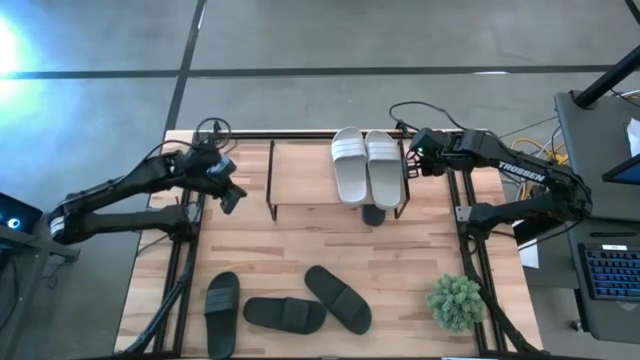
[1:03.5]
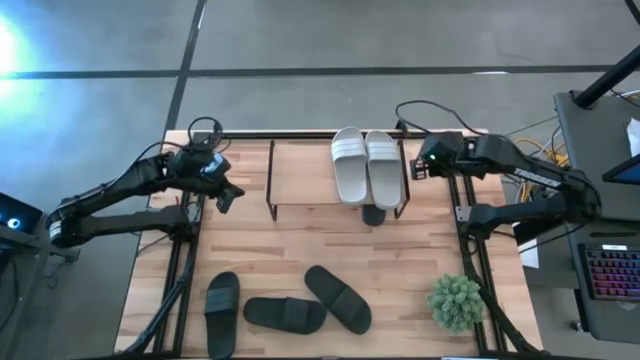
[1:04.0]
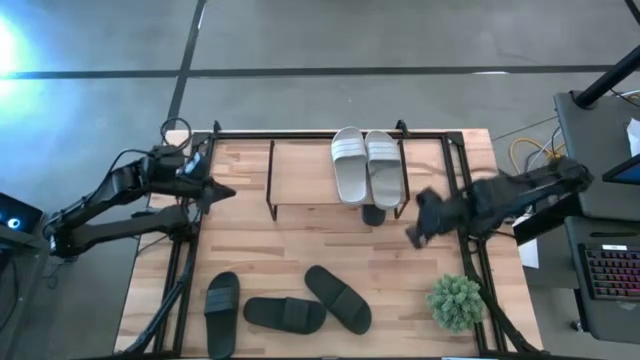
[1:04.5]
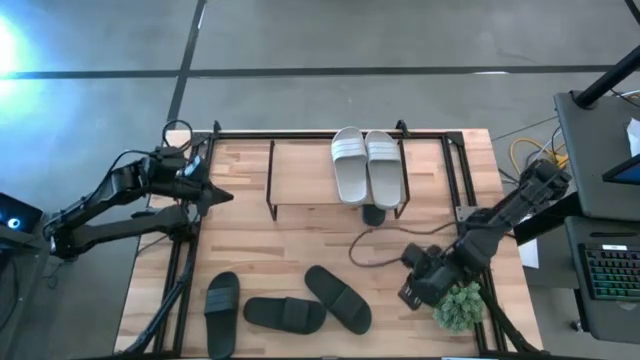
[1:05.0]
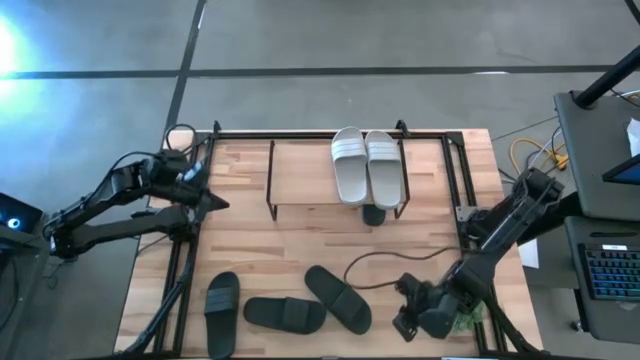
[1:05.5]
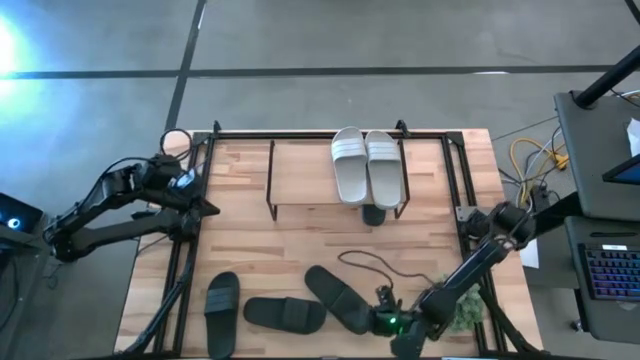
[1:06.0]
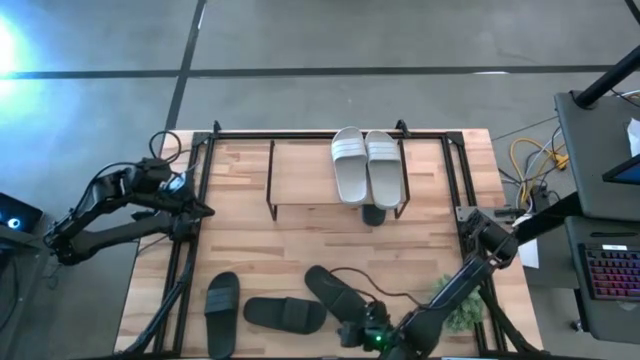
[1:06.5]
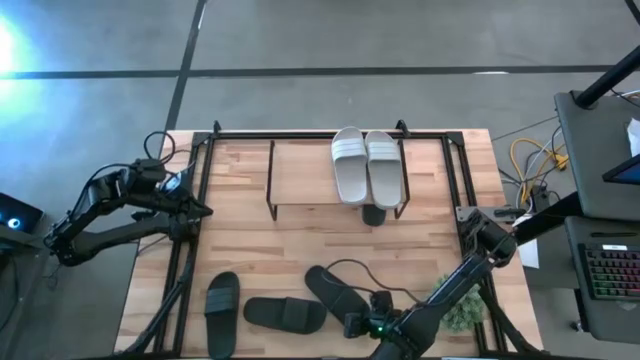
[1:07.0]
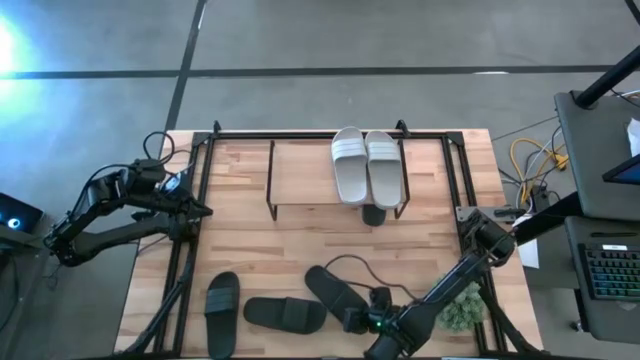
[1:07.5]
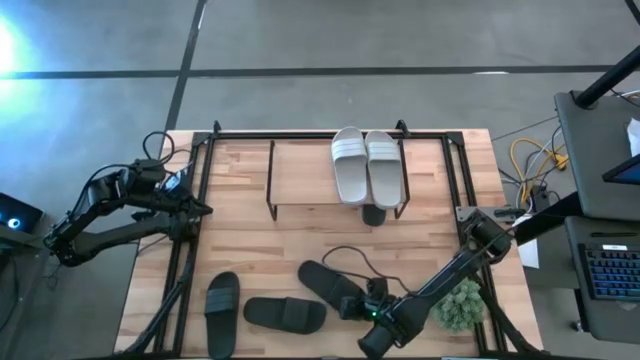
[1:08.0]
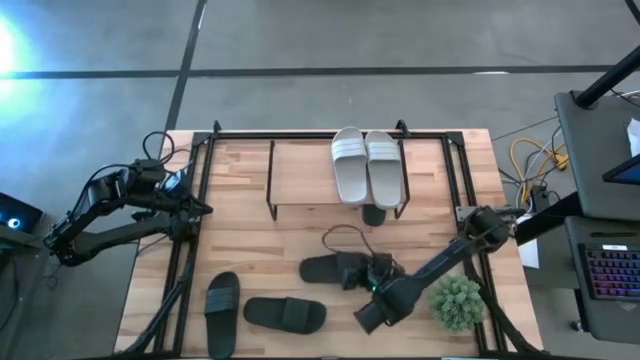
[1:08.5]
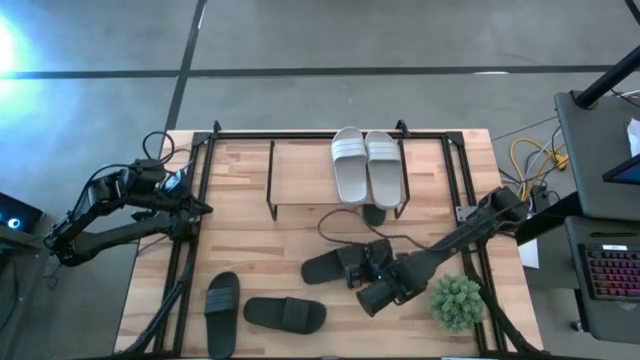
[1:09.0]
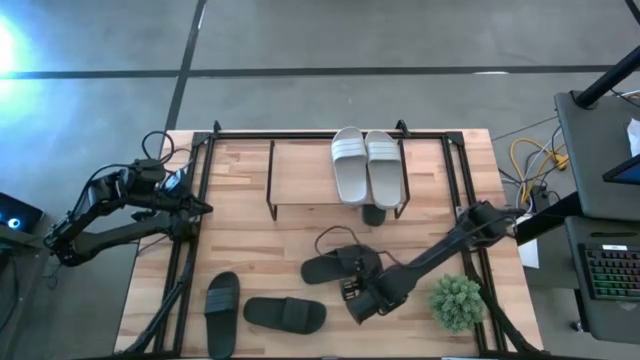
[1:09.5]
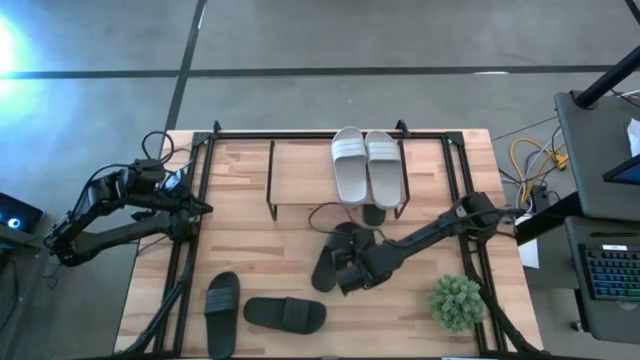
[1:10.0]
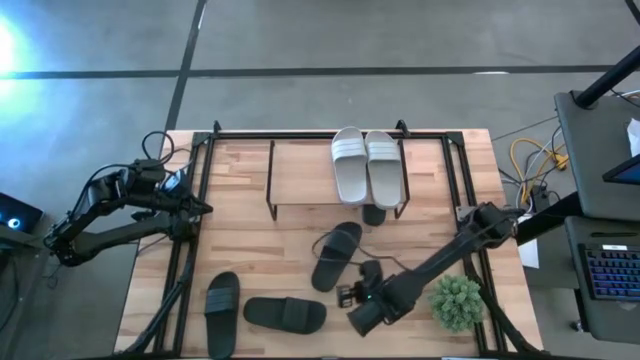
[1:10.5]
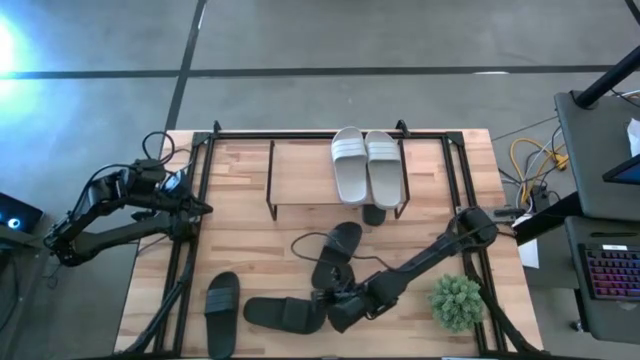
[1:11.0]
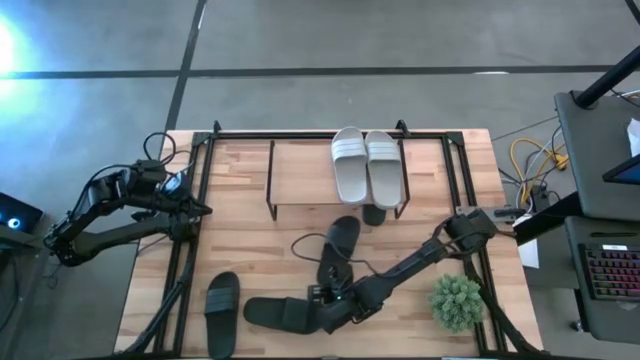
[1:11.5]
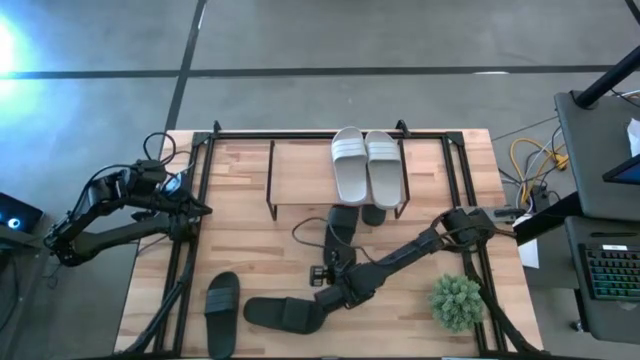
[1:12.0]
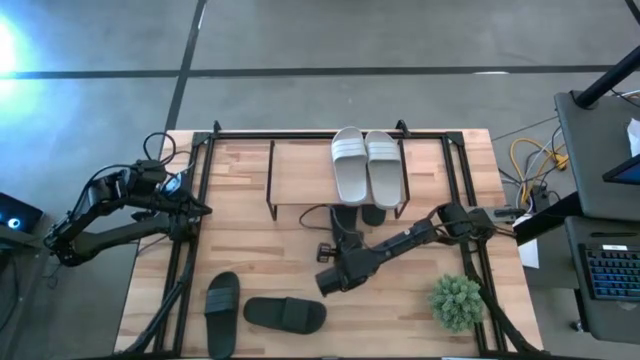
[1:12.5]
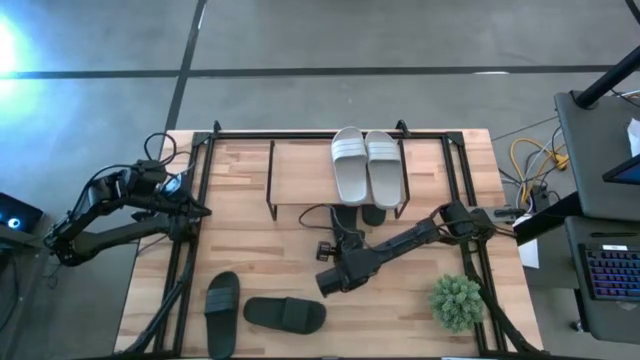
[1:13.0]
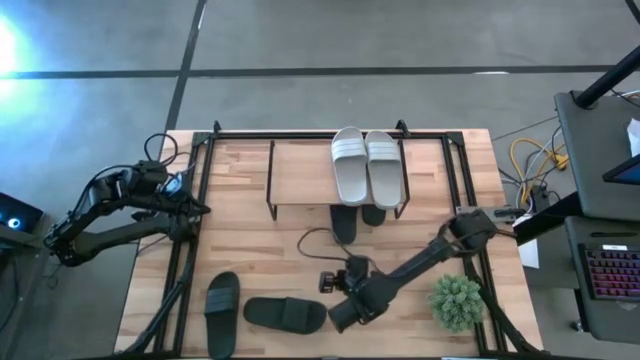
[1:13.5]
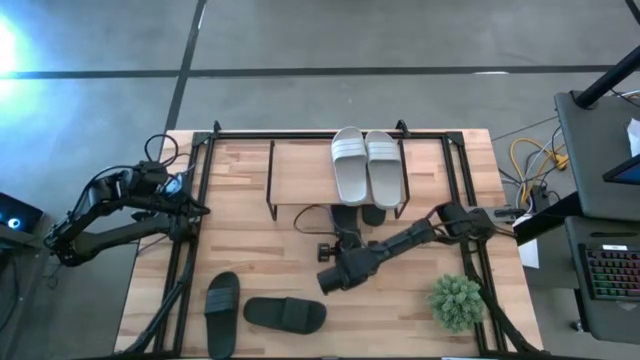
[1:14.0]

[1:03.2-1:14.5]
Task: Pick and place slides into the shelf
Put the black slipper under the shelf

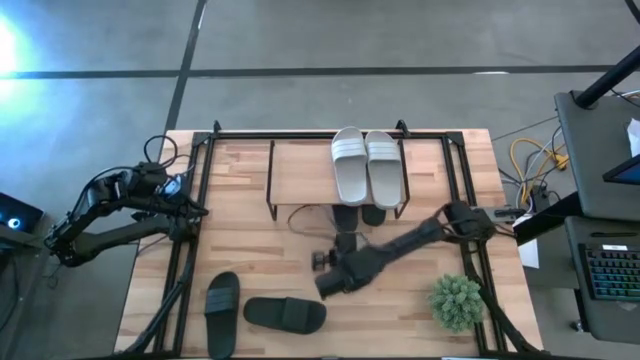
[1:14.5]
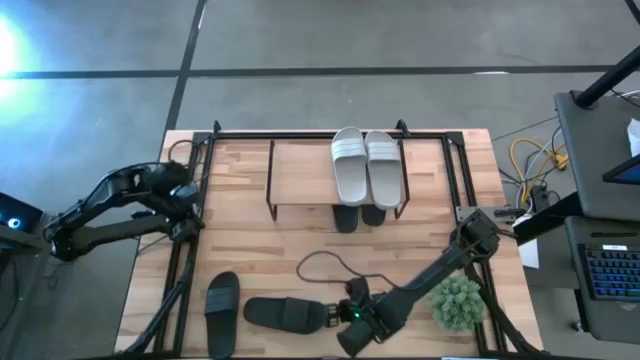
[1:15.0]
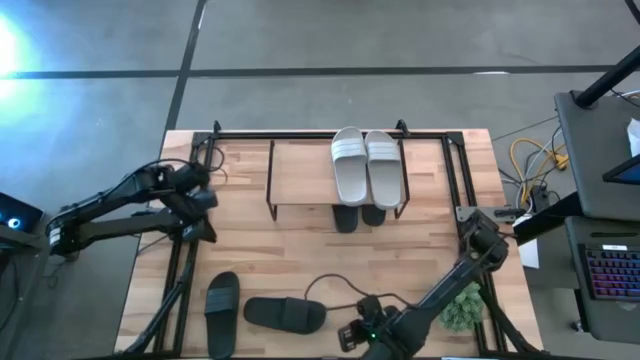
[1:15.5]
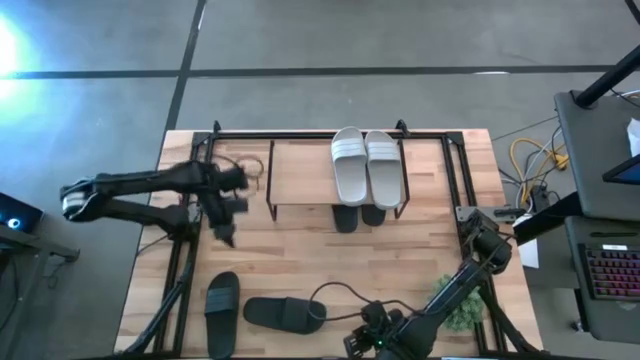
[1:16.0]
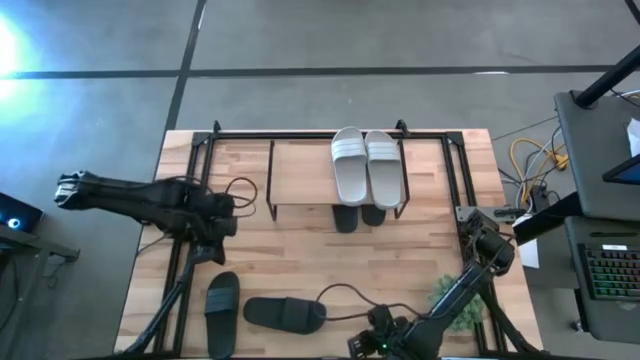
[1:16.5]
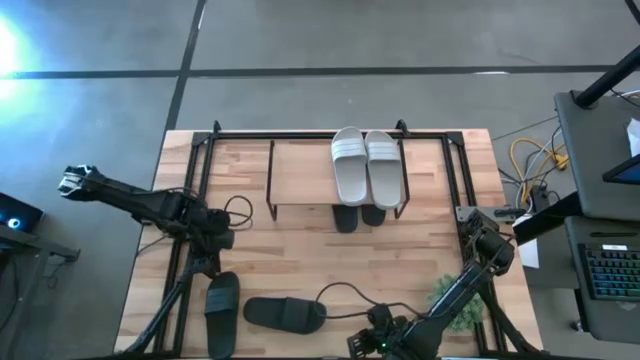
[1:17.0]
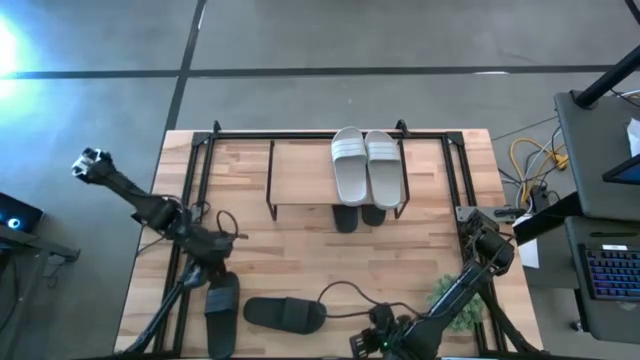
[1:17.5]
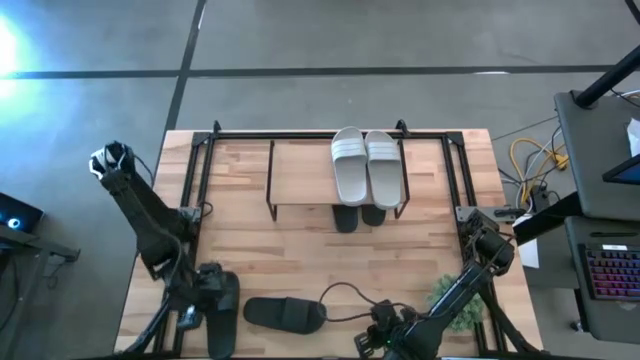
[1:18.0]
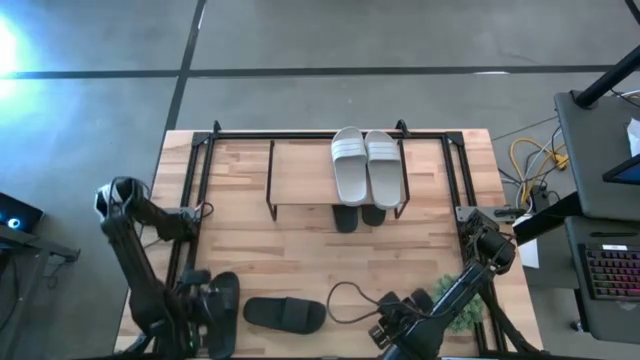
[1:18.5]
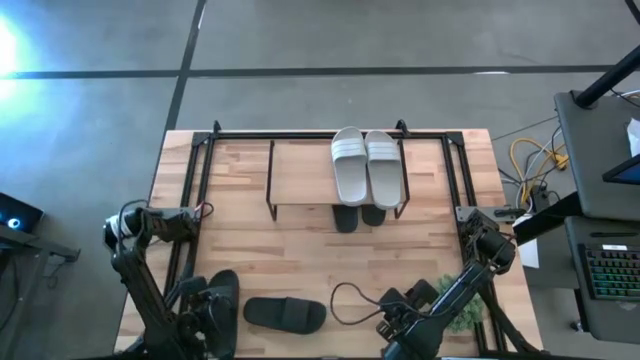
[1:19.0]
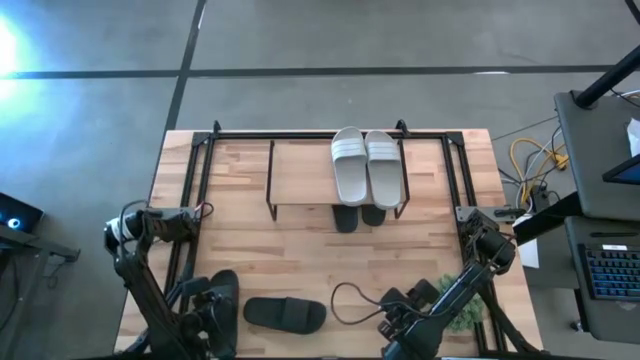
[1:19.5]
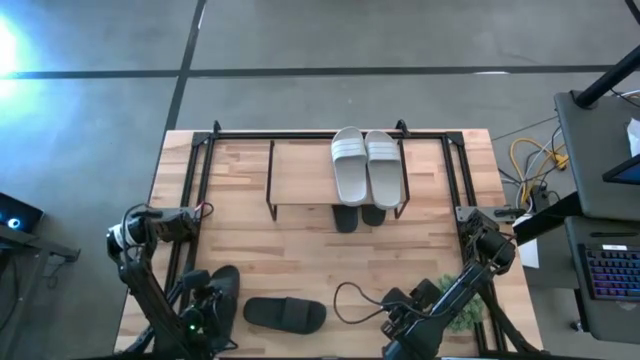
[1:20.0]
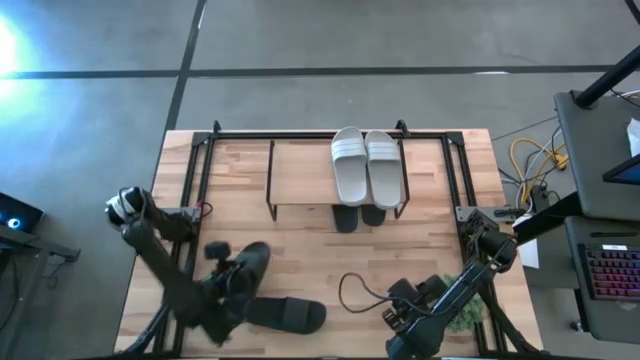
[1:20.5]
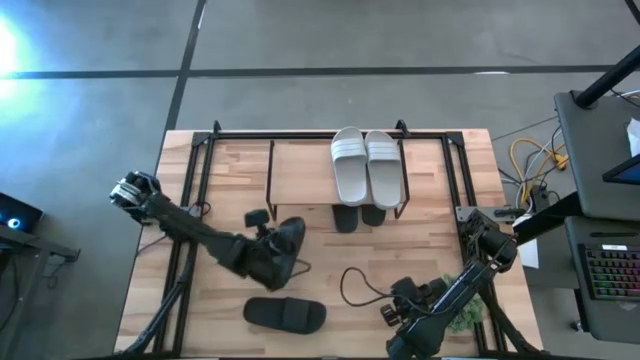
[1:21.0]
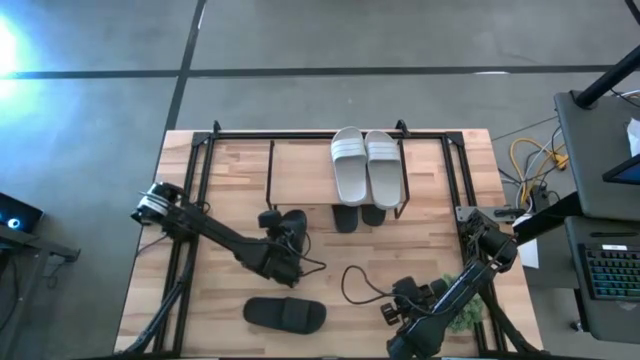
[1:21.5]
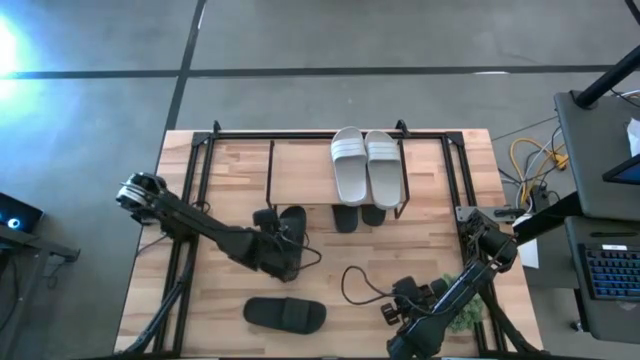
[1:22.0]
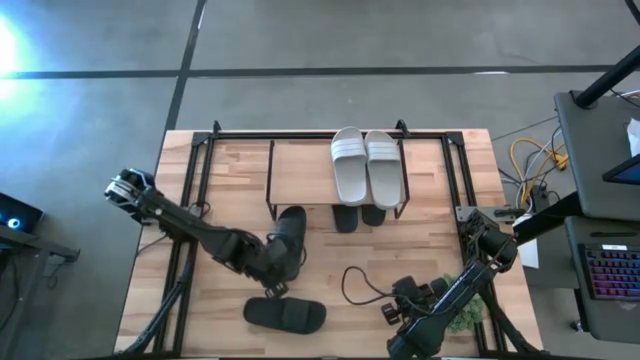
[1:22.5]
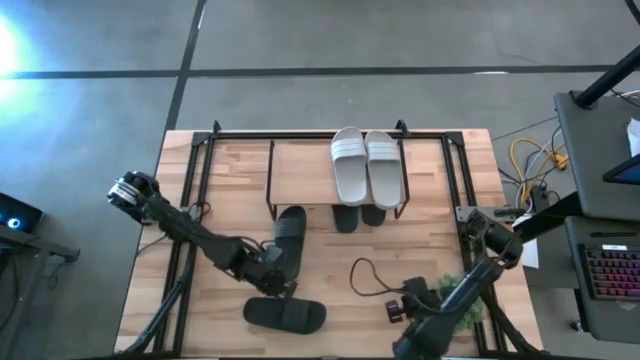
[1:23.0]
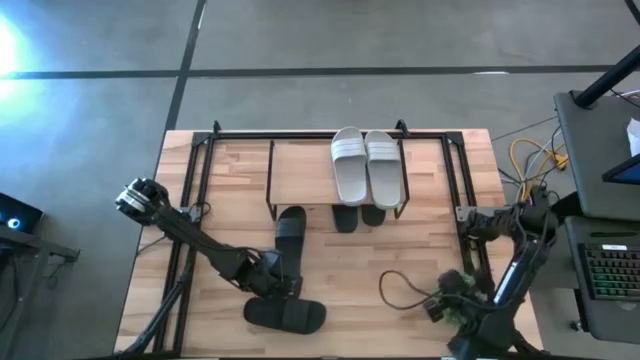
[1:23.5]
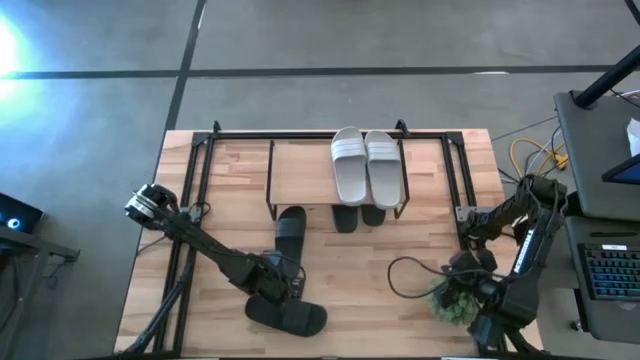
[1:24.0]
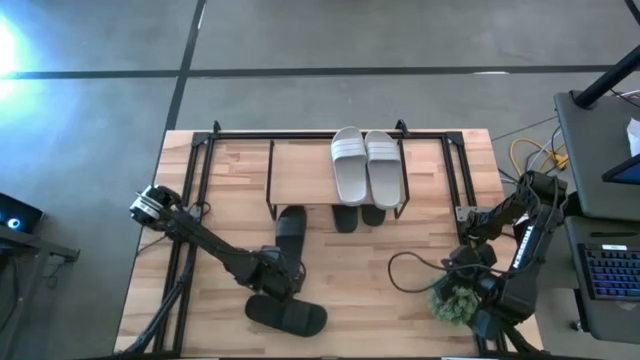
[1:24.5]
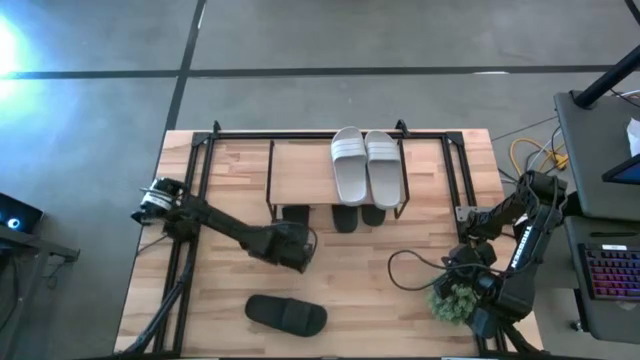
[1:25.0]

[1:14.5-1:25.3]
Put the black slipper under the shelf
